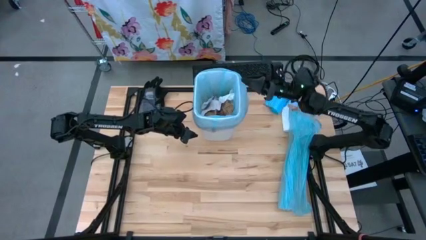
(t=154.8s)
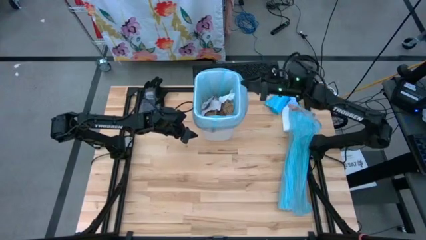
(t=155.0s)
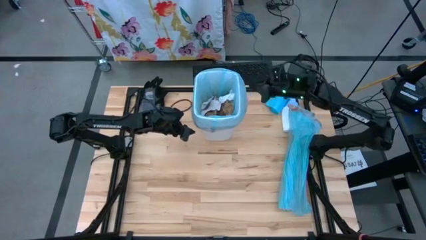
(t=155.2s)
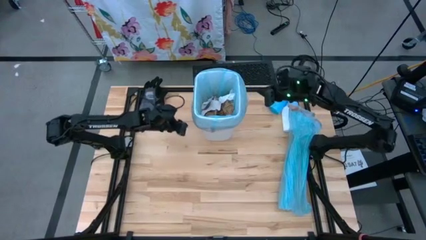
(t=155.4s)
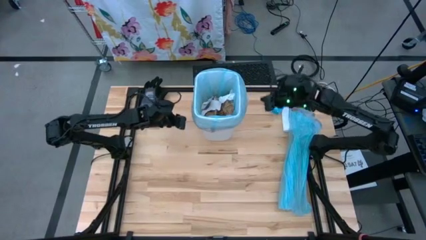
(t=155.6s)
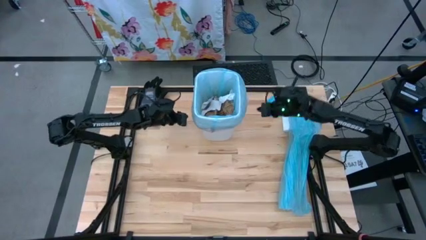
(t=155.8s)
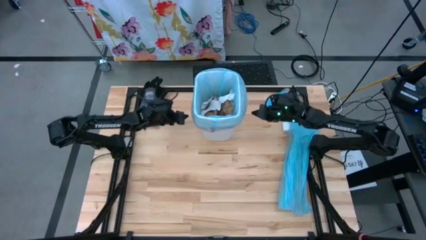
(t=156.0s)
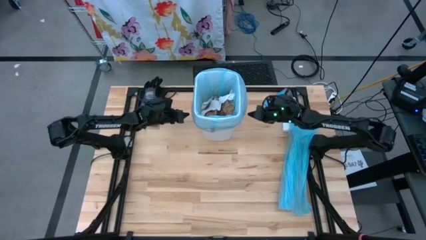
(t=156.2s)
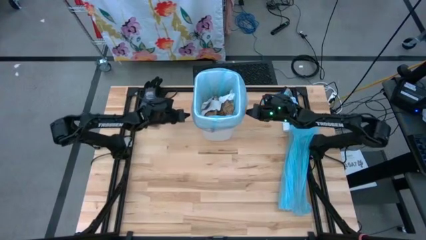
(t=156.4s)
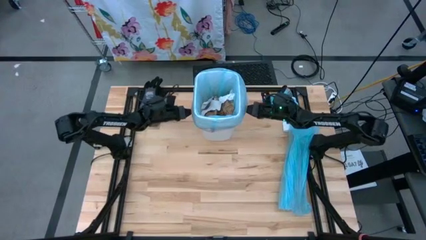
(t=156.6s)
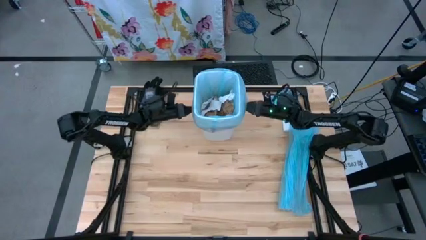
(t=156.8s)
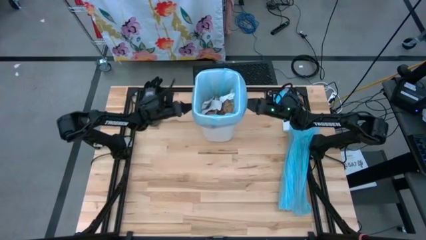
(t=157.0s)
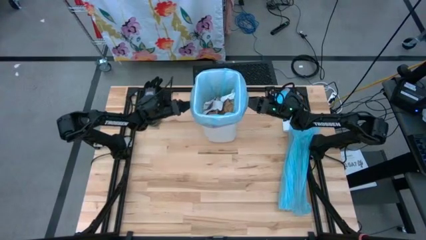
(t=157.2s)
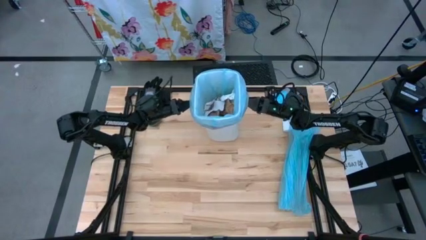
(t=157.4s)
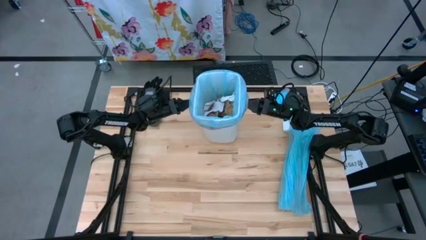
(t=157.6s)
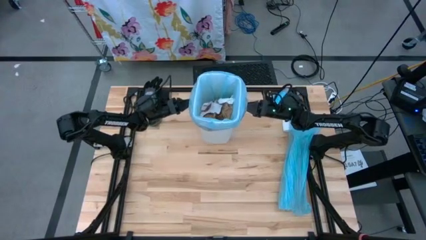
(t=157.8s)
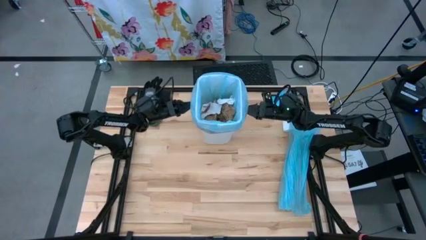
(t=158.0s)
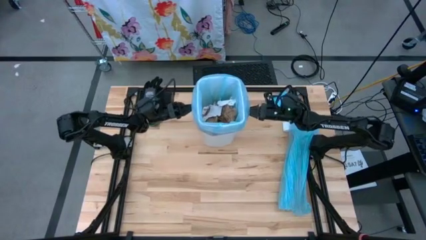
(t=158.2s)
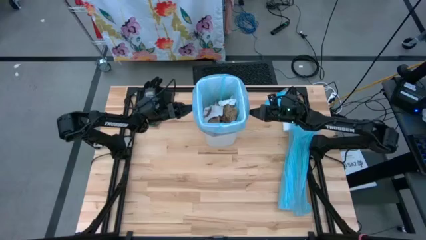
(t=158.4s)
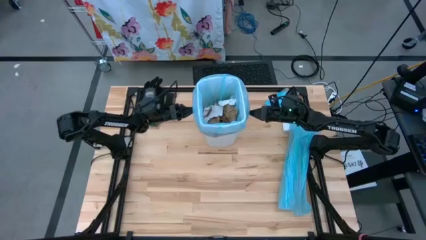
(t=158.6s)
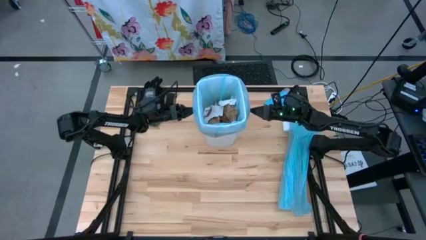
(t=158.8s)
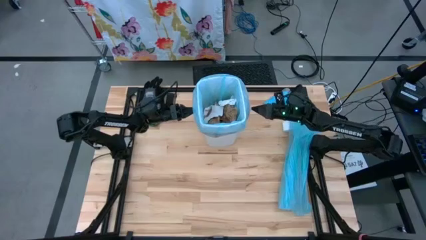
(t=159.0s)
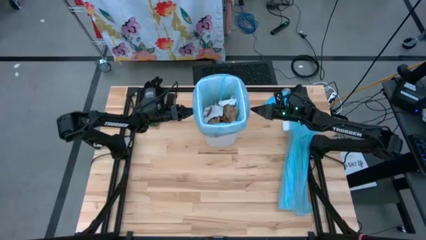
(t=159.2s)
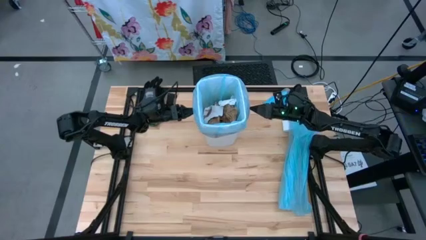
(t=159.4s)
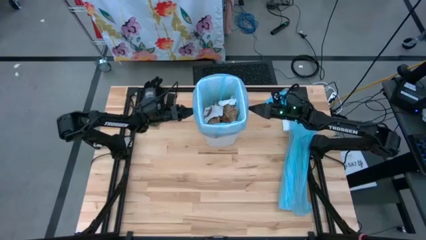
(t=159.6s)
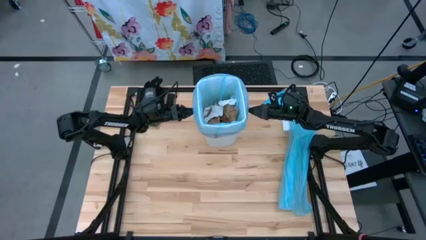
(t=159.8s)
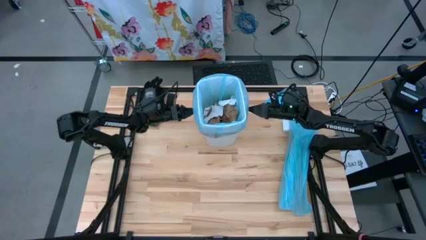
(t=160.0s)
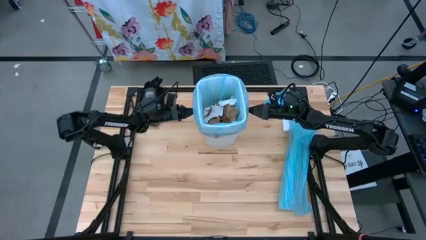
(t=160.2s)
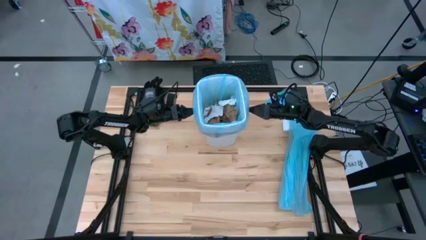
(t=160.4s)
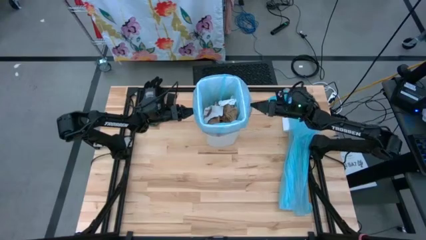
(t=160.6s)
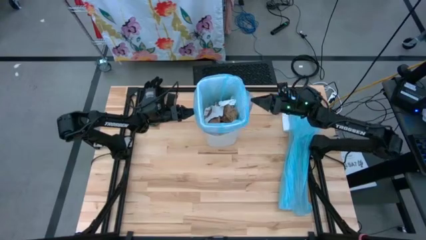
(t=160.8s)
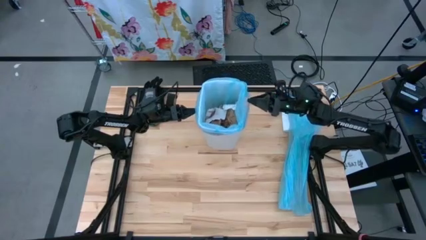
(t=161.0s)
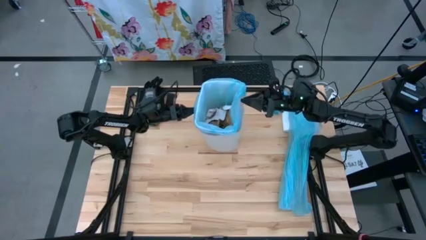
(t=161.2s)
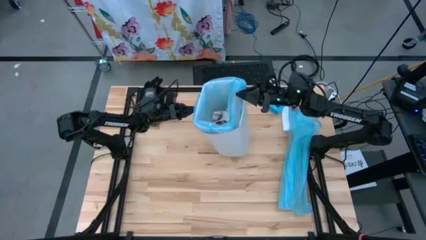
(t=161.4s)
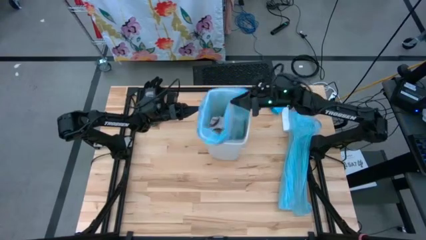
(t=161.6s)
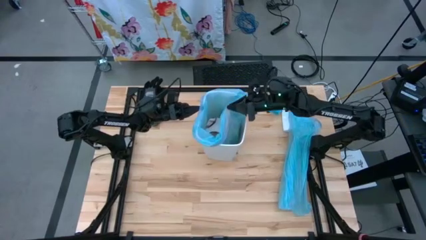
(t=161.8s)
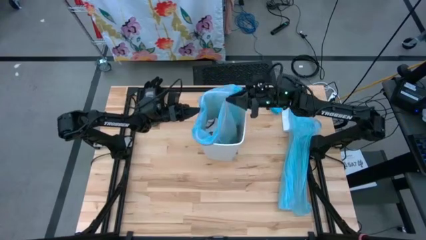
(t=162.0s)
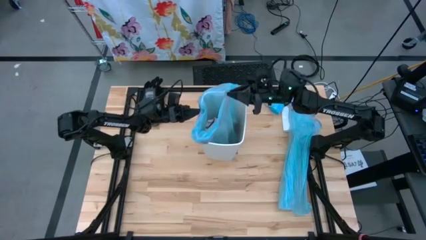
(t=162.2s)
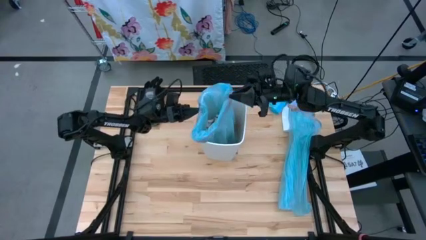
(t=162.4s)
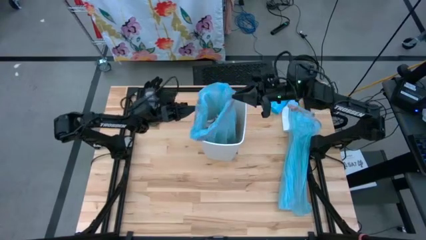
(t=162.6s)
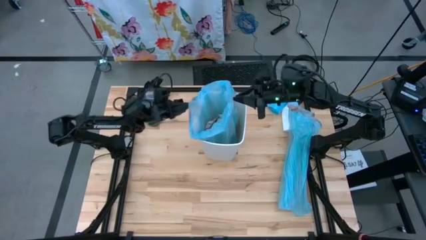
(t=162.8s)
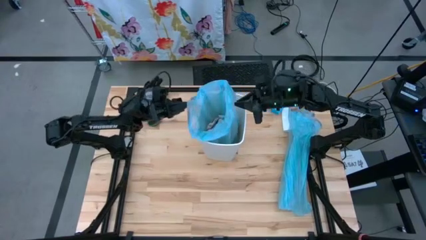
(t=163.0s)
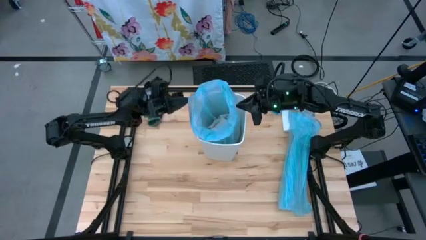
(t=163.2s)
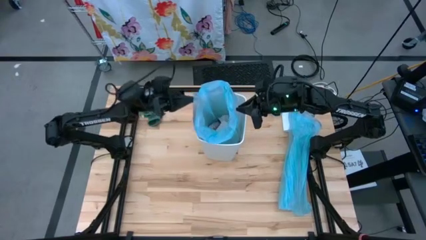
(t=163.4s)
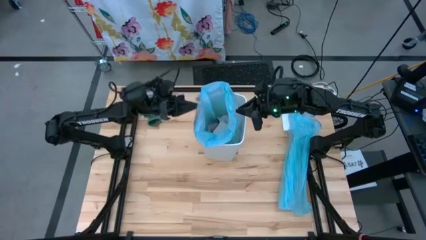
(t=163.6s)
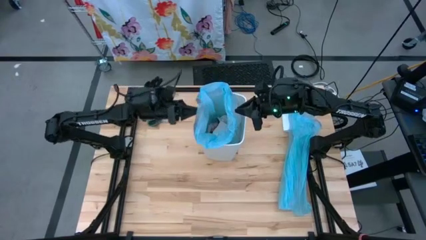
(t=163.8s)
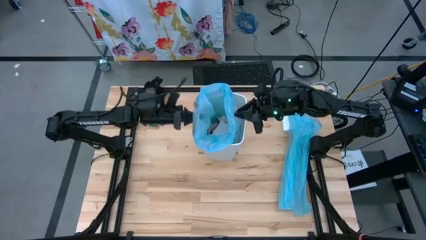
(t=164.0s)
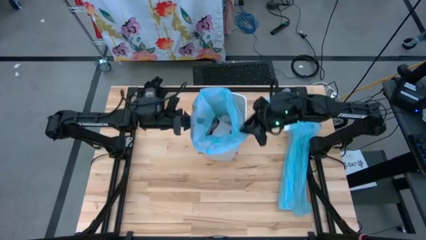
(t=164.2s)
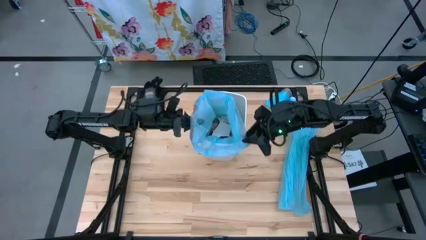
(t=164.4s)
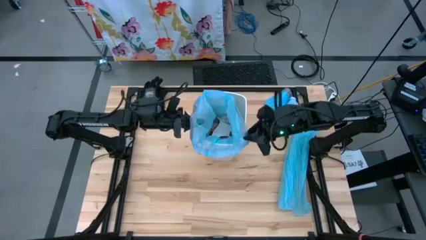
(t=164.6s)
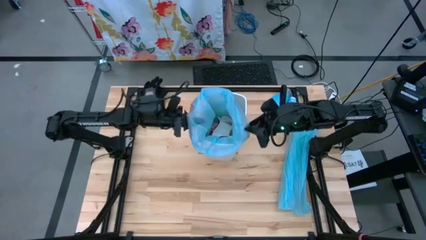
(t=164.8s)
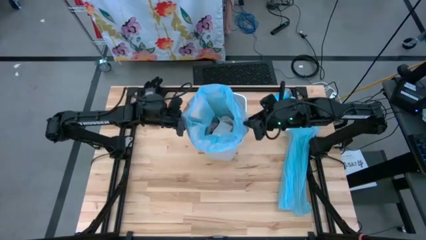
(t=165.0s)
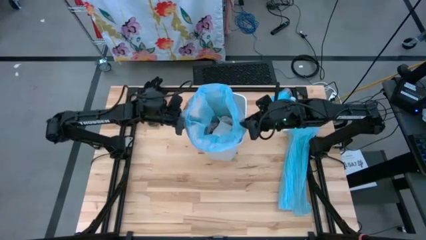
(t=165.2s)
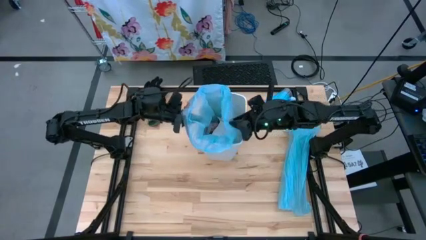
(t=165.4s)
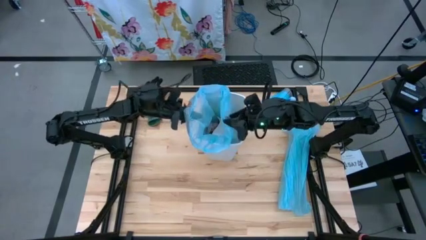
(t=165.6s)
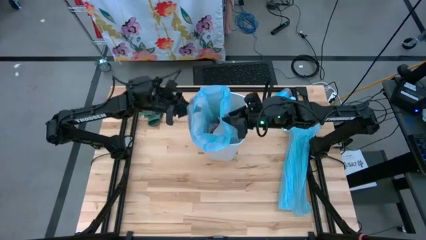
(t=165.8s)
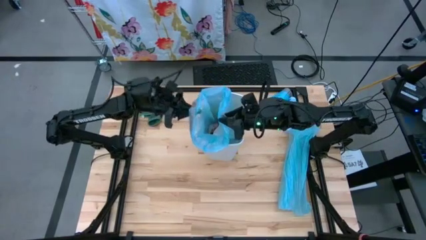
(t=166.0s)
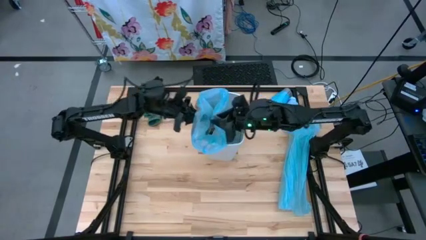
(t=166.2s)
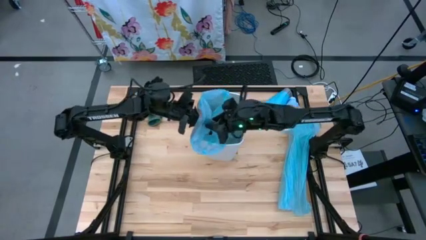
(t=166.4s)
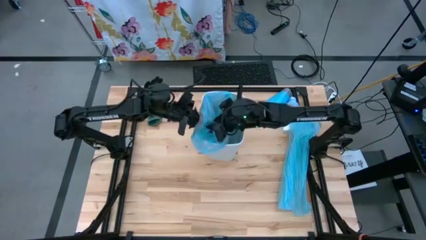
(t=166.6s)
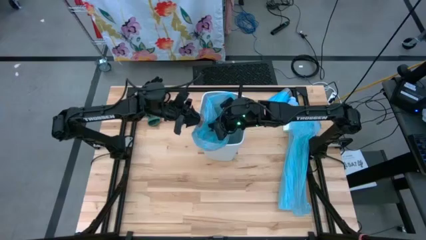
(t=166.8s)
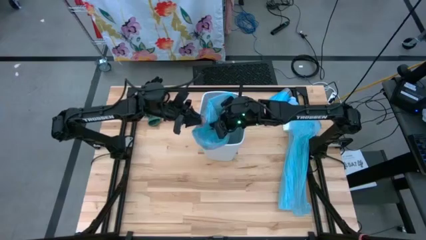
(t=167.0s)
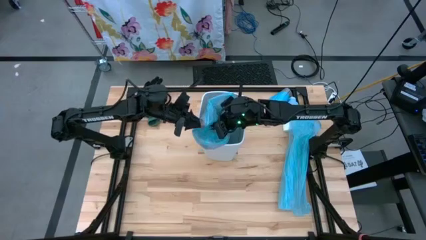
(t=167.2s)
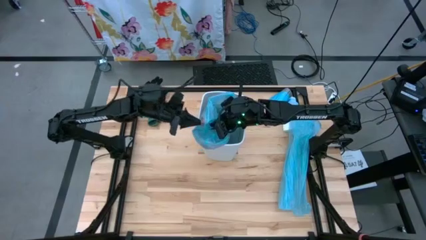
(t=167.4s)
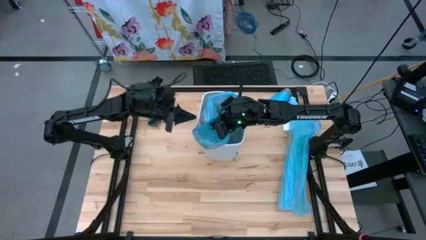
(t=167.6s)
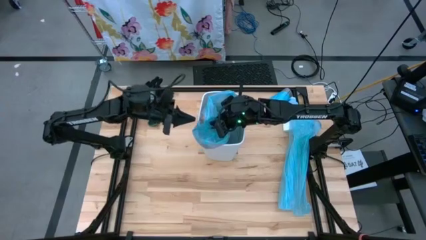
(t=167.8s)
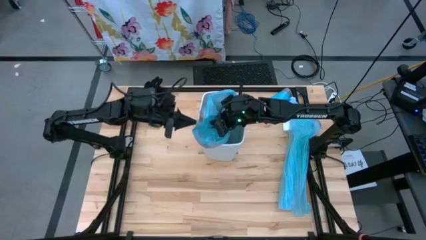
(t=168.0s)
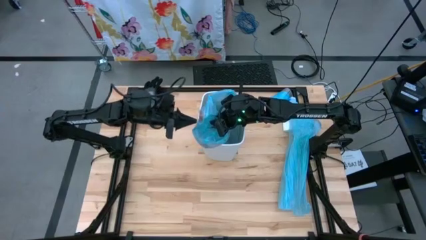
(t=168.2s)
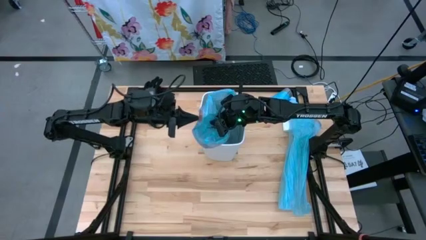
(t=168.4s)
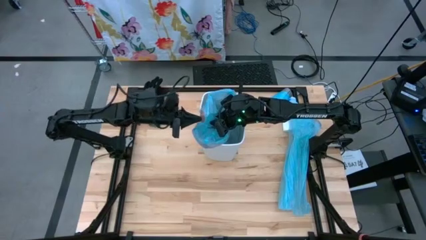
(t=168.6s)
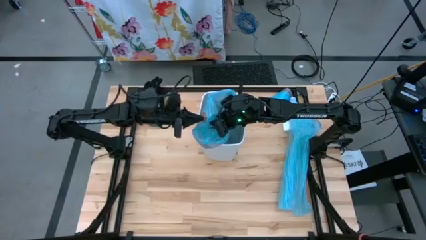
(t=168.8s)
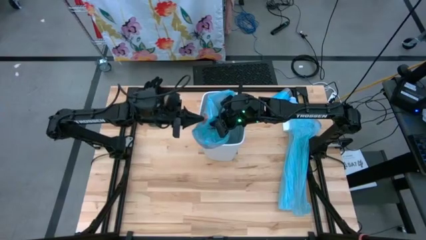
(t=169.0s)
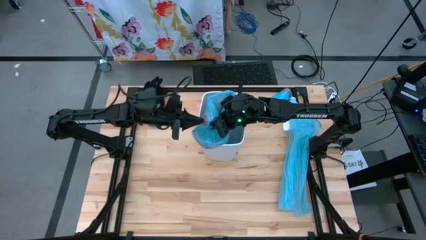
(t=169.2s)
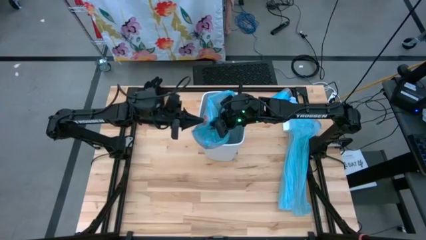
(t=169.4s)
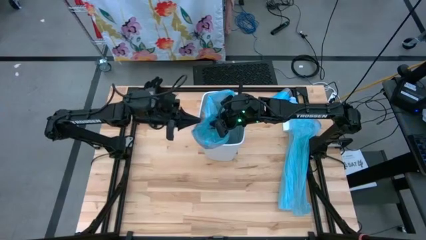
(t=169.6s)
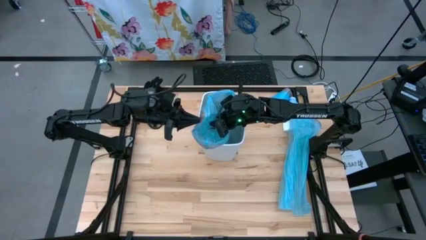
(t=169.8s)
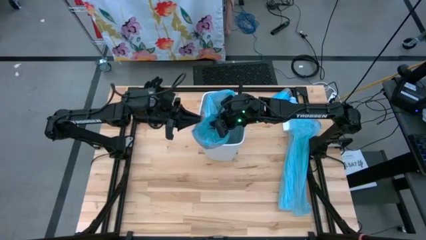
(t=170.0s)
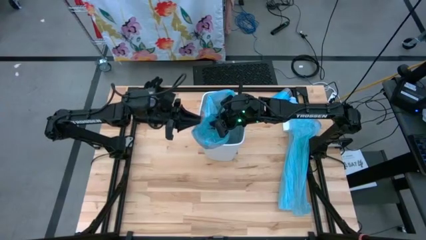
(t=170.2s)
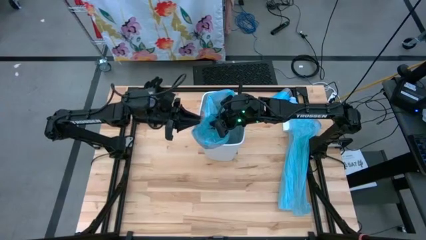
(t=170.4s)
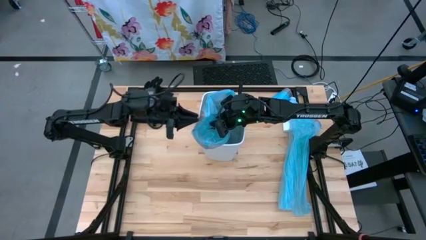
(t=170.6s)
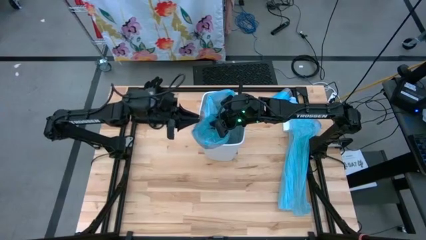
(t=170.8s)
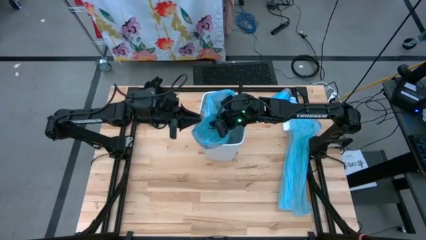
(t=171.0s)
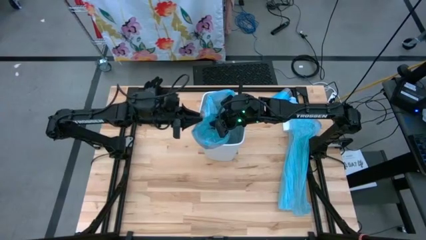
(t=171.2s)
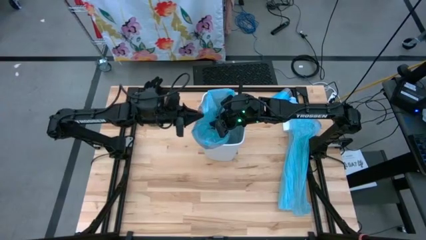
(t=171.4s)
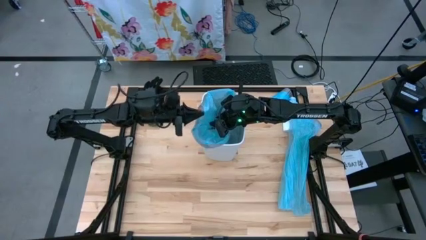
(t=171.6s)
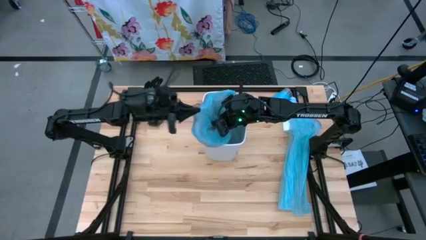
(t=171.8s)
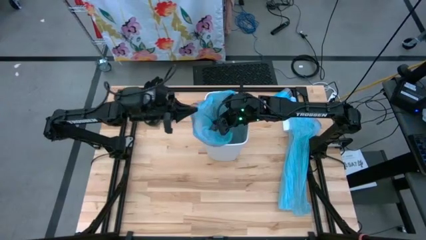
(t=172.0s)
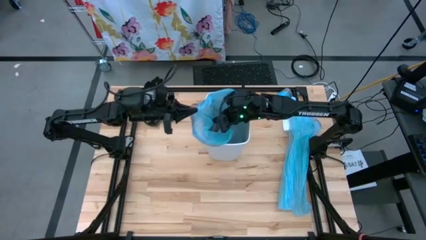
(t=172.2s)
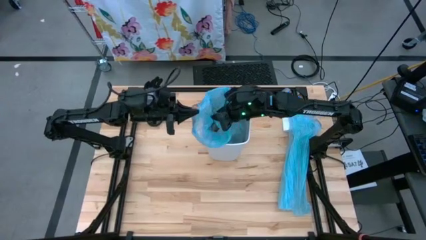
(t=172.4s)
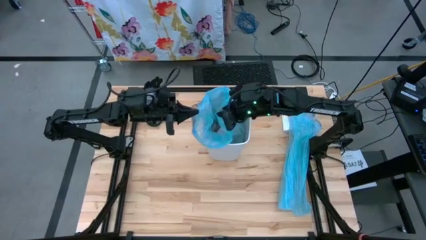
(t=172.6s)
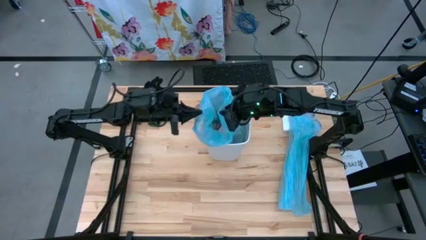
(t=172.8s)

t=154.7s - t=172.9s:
Task: place trash/remove bag and relplace
Close the trash bag
